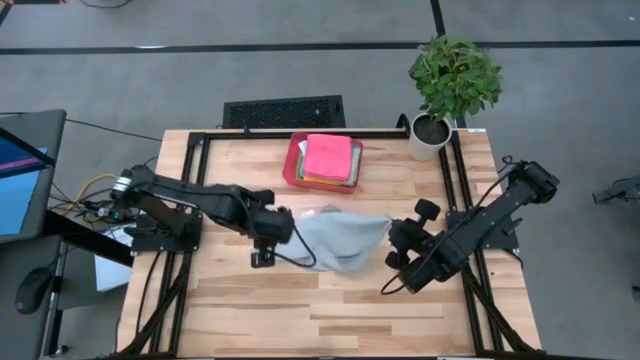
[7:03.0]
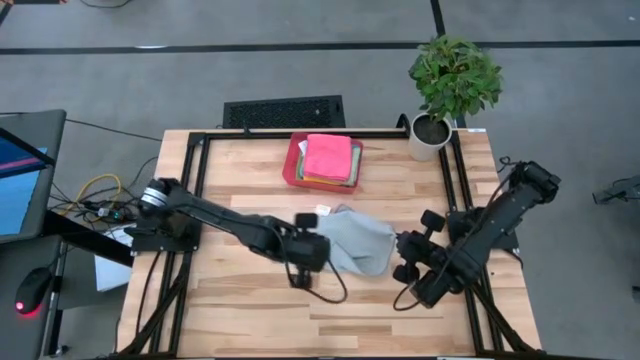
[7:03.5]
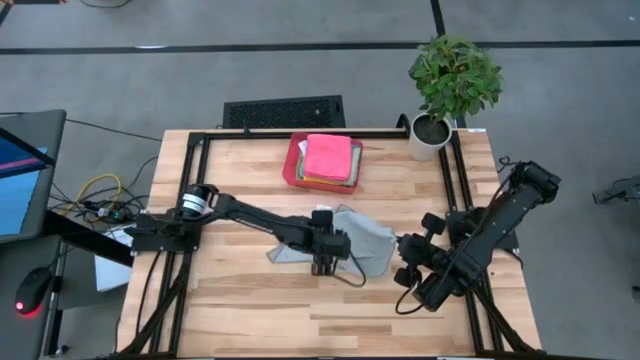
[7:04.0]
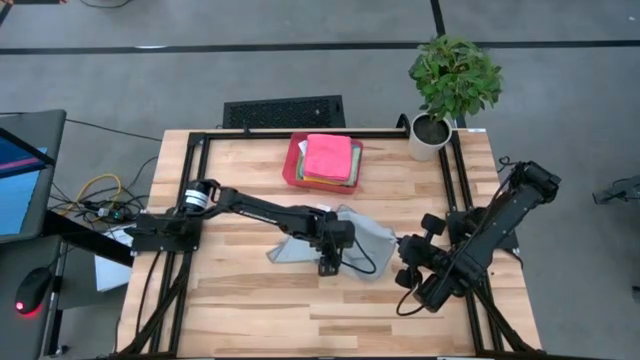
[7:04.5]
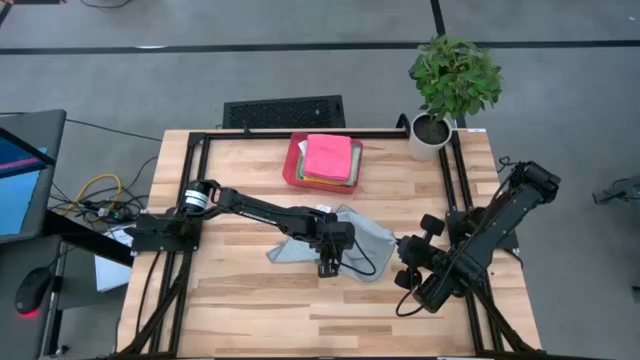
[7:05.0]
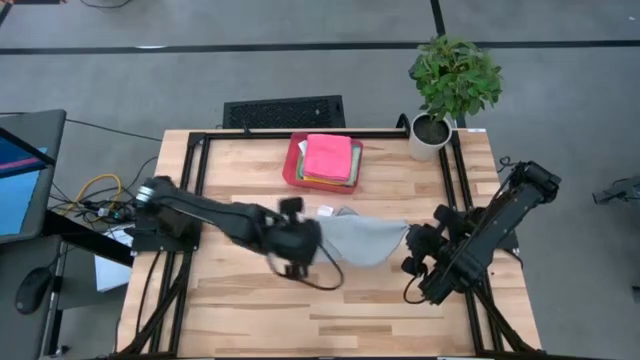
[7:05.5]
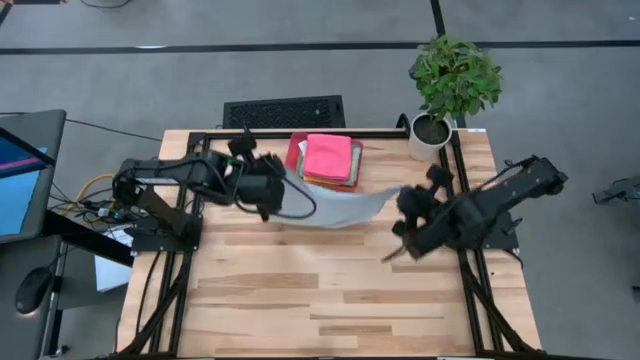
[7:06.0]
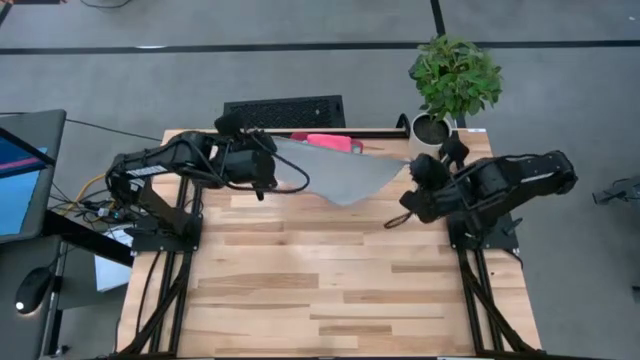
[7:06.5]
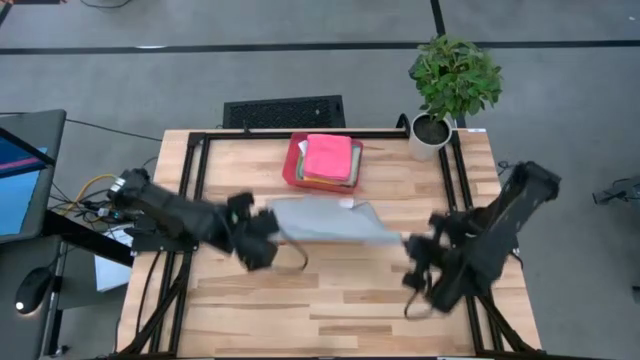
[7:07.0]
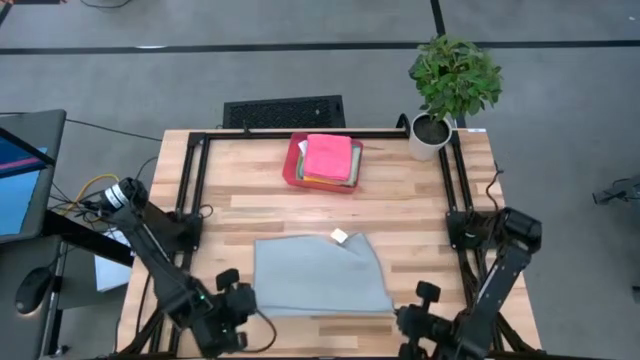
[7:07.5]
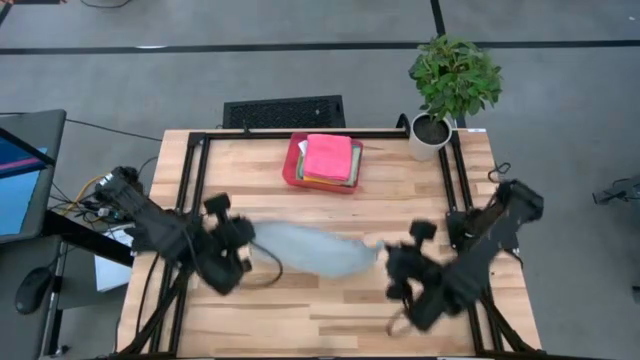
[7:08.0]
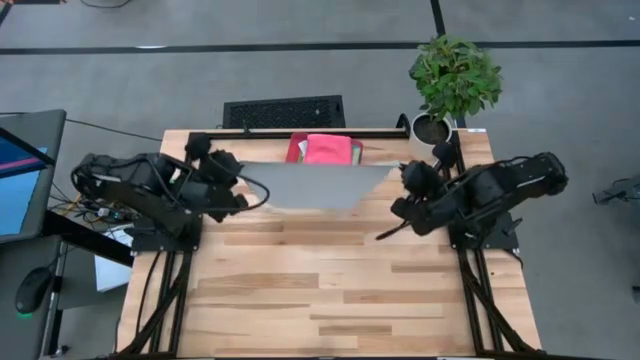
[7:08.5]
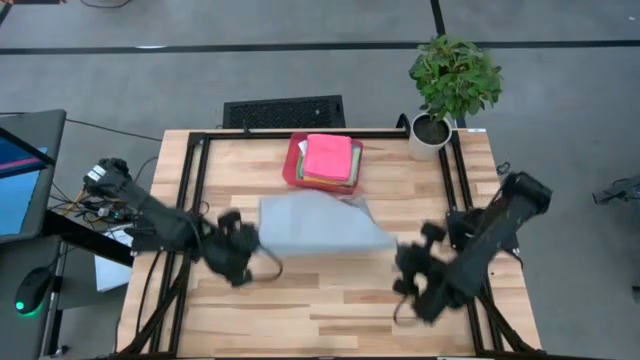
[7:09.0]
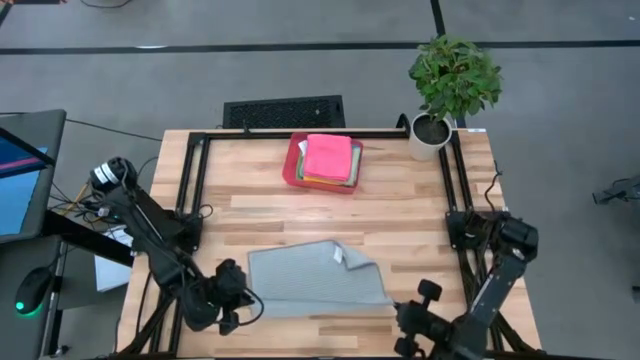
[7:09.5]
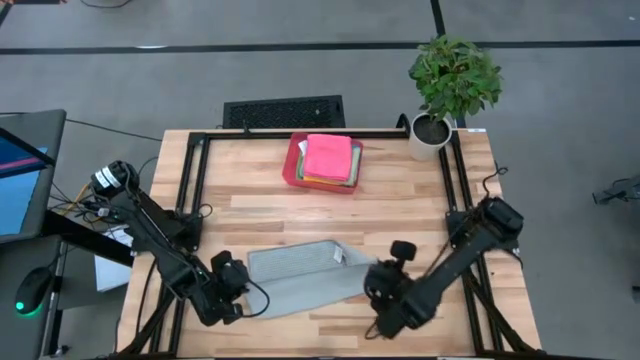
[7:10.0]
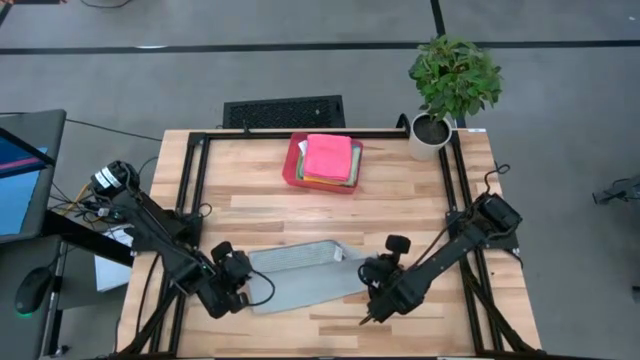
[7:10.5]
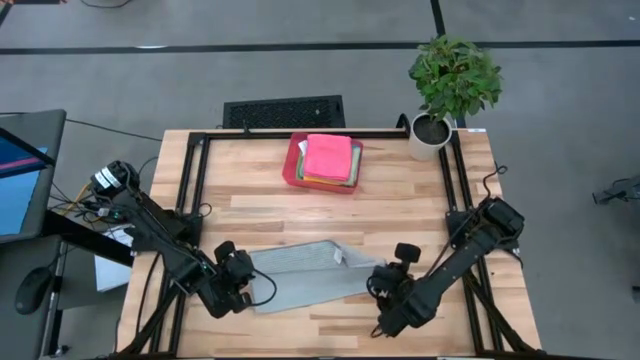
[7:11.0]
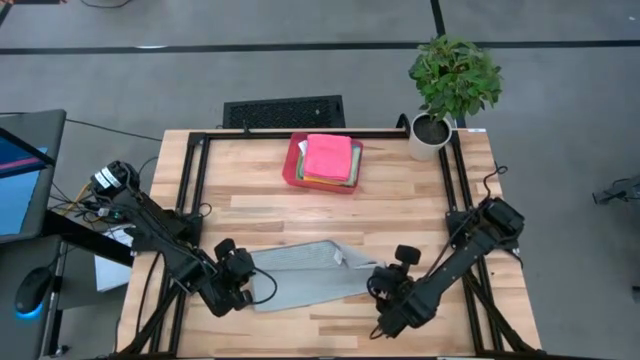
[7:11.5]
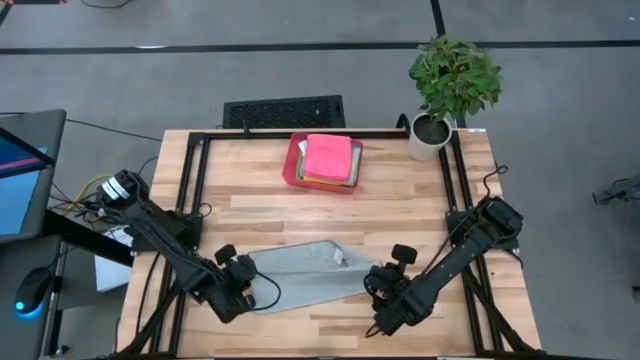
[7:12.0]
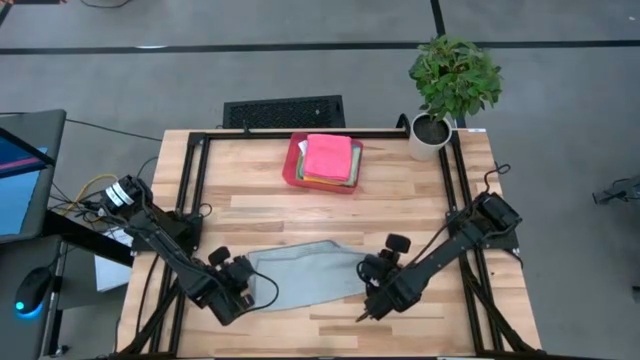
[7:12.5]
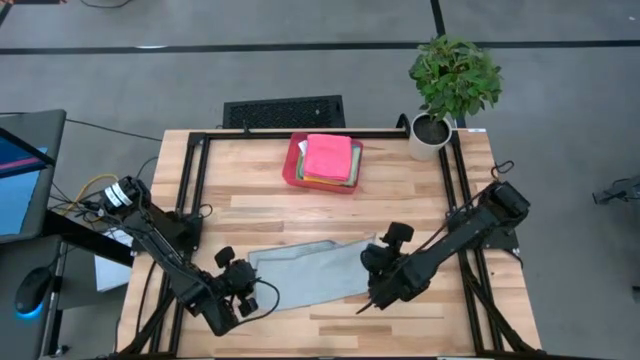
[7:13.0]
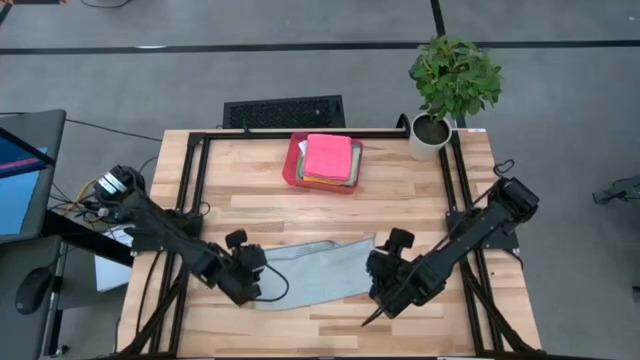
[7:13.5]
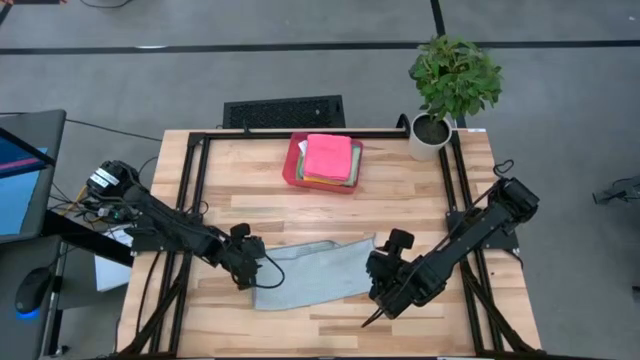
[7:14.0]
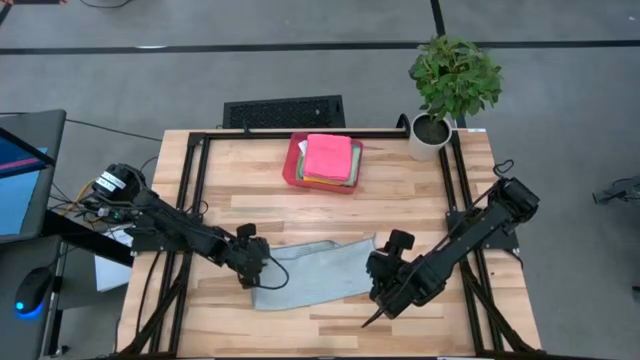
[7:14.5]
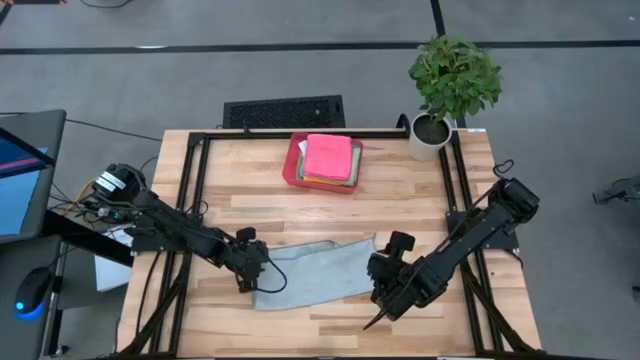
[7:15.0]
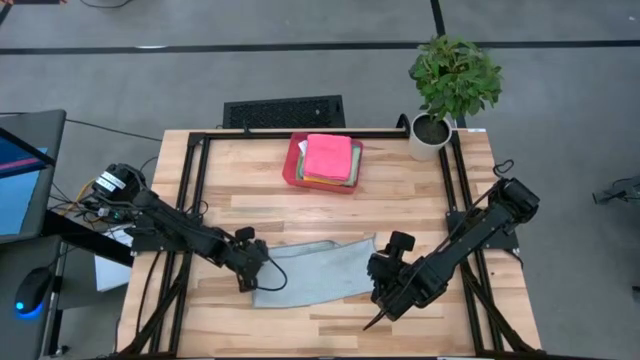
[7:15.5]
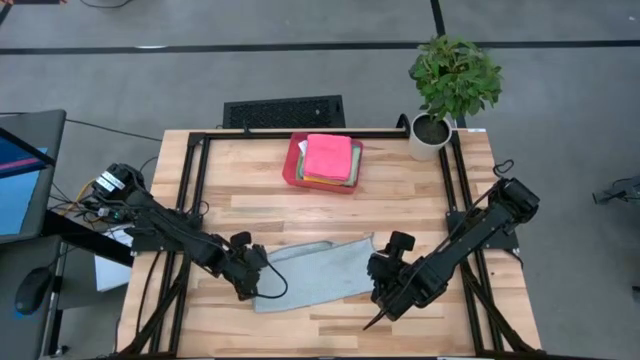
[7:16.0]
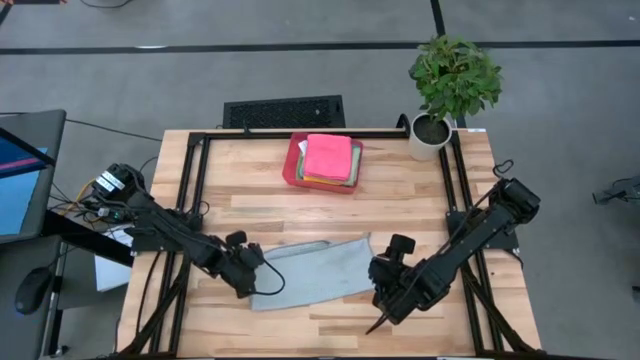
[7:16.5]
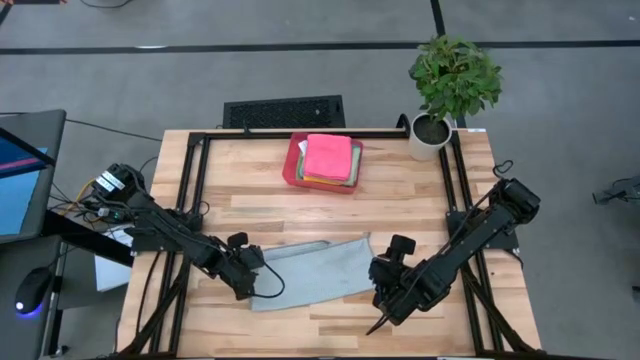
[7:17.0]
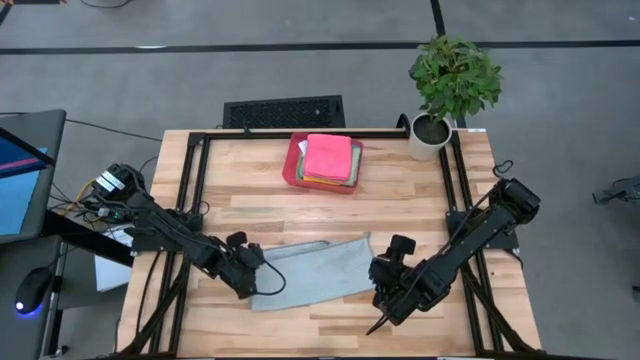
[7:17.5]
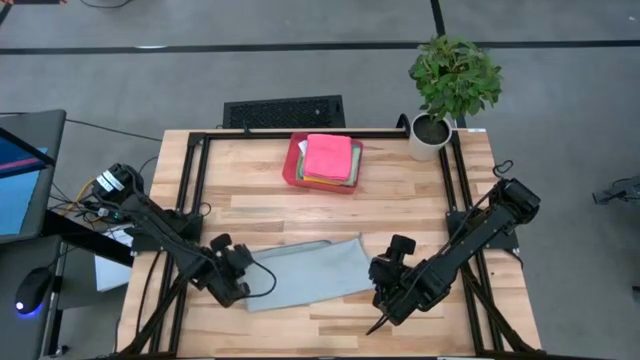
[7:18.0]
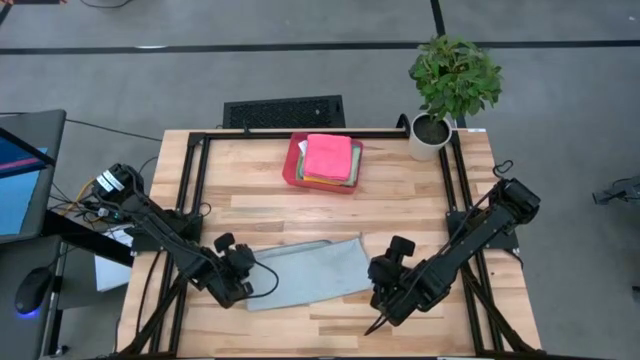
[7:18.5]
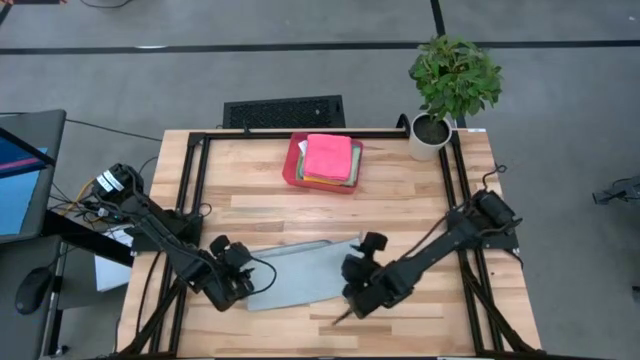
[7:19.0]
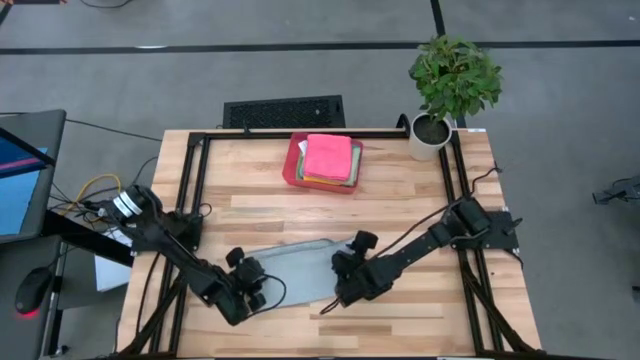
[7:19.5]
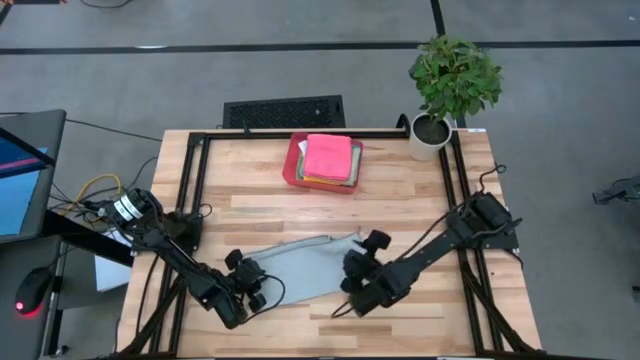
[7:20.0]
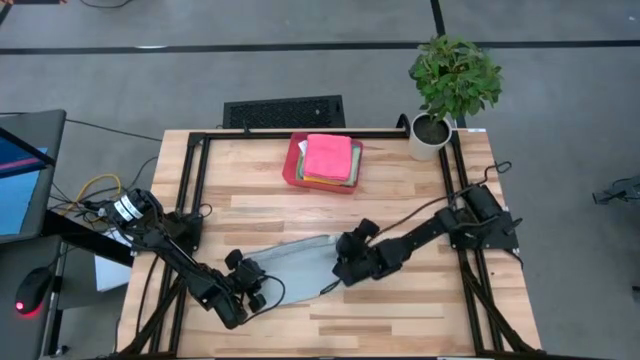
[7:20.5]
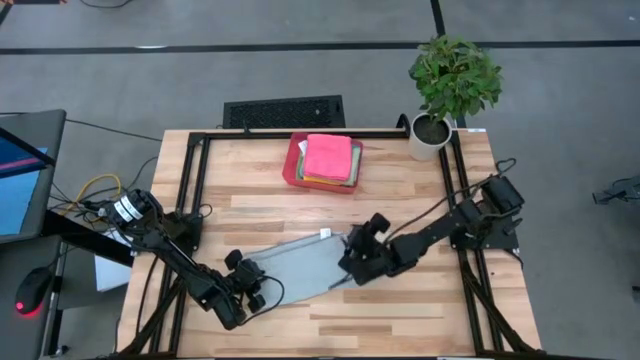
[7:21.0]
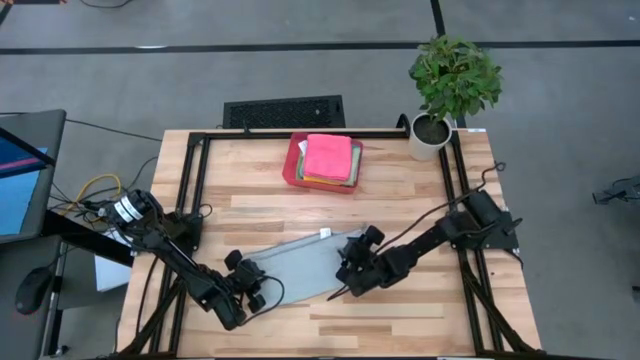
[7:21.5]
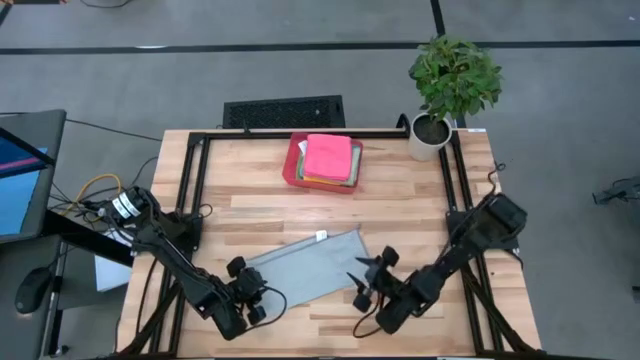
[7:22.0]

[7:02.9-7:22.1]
Task: Fold microfiber towels
Fold the gray microfiber cloth

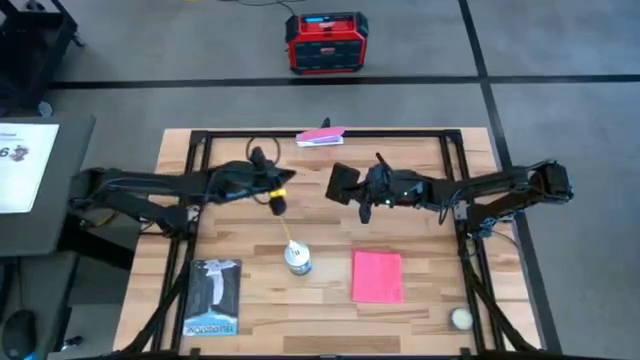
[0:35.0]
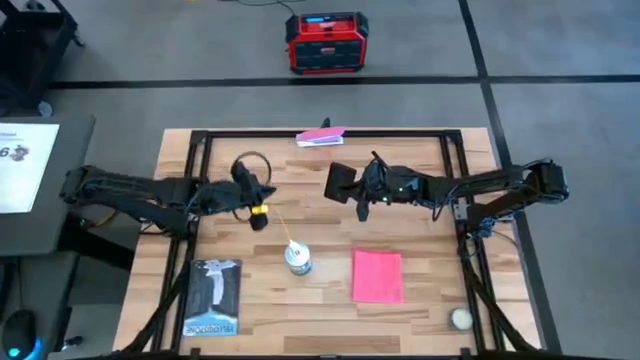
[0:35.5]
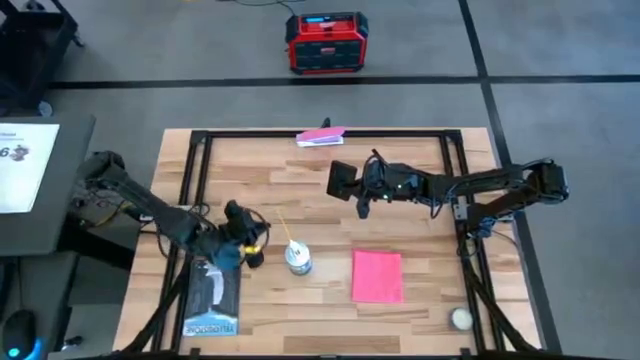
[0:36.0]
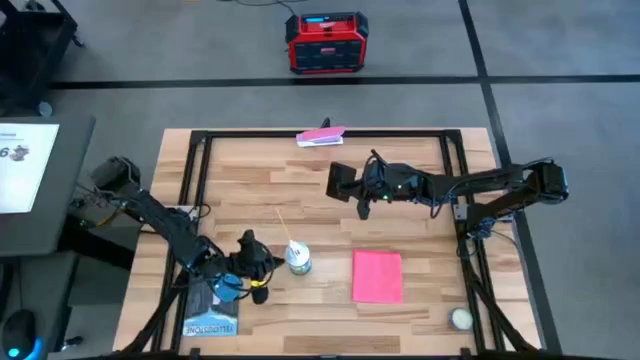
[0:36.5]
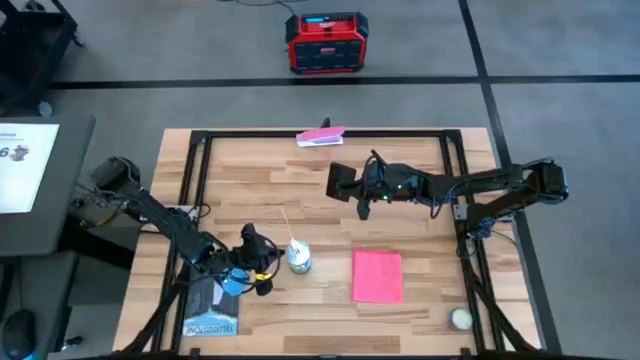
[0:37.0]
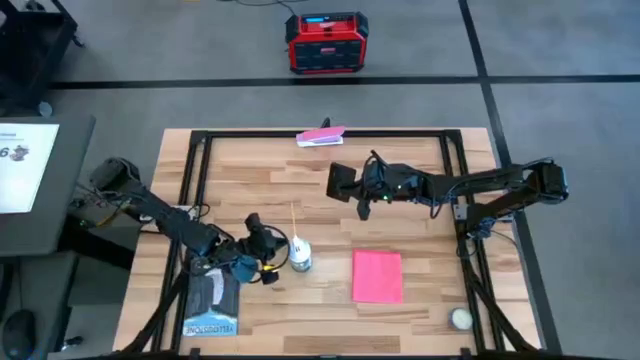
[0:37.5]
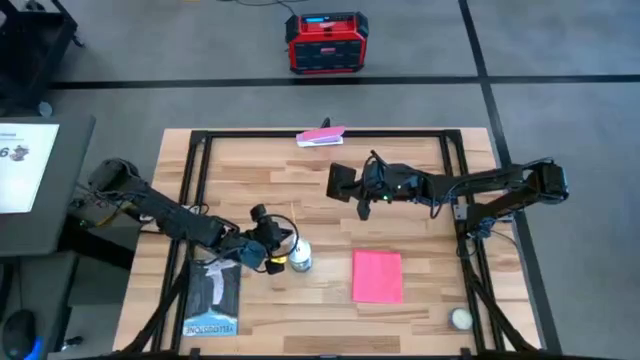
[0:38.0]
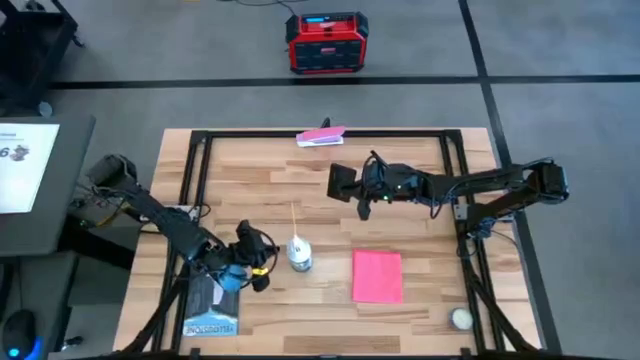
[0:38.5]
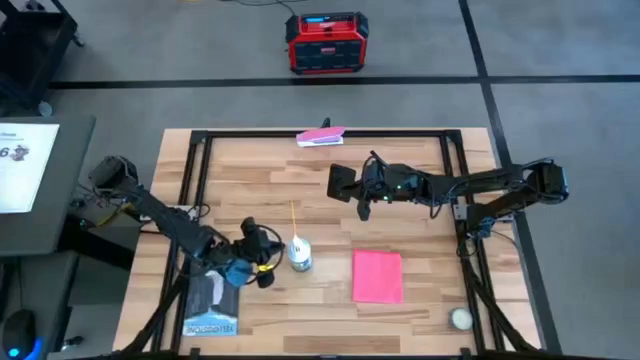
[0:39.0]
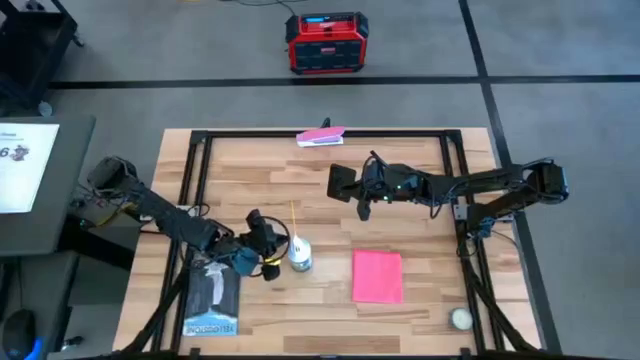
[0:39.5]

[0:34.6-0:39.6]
Task: Apply microfiber cloth
Prepare the spray bottle
